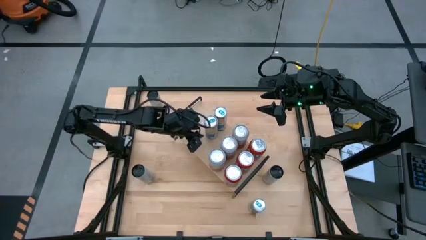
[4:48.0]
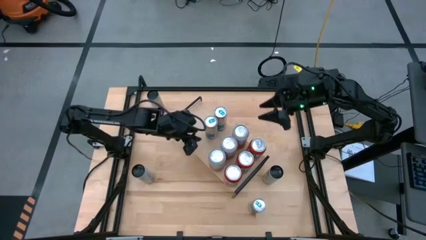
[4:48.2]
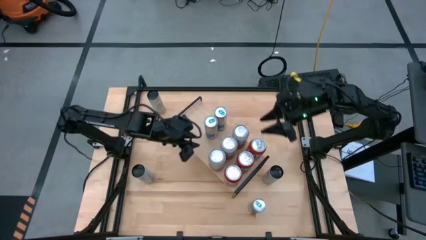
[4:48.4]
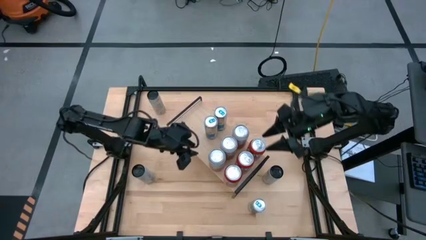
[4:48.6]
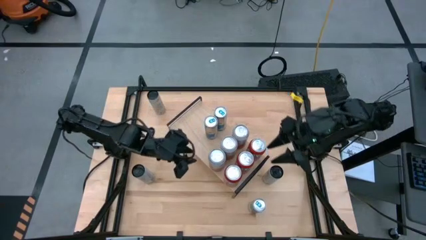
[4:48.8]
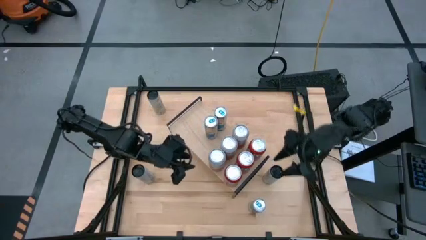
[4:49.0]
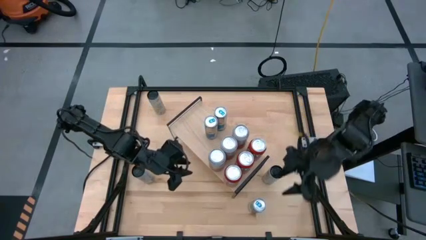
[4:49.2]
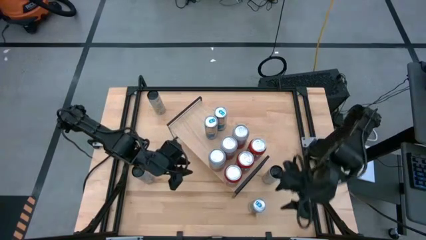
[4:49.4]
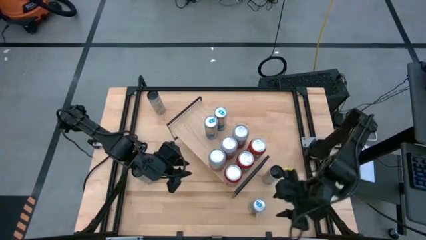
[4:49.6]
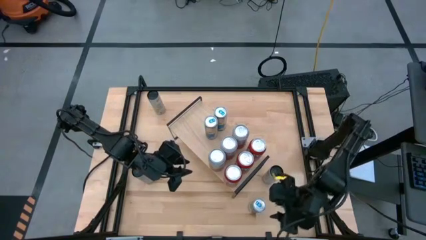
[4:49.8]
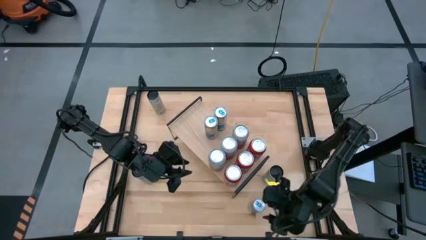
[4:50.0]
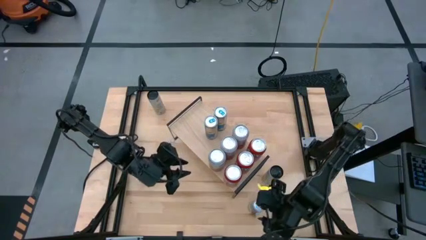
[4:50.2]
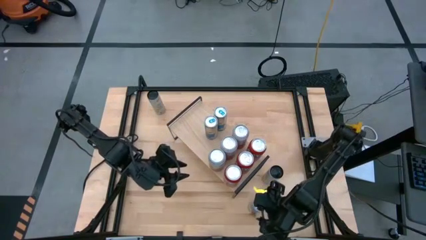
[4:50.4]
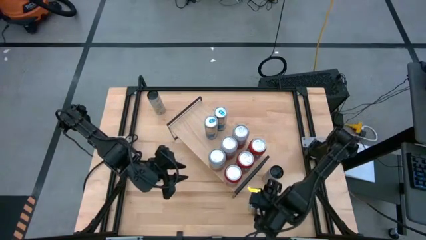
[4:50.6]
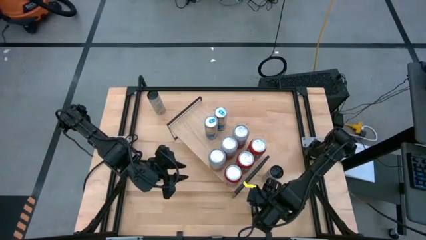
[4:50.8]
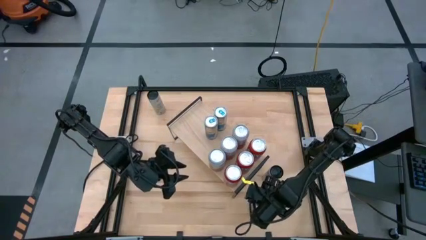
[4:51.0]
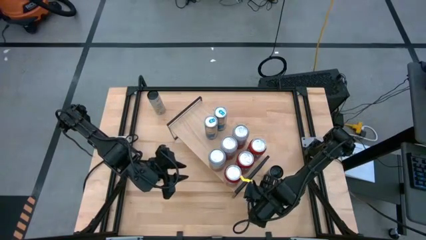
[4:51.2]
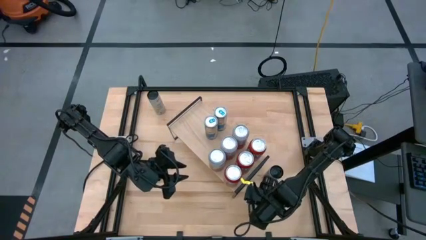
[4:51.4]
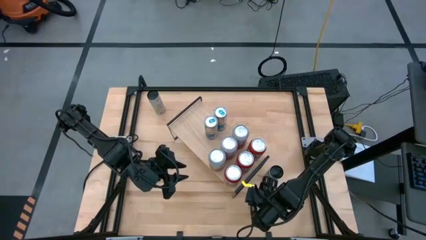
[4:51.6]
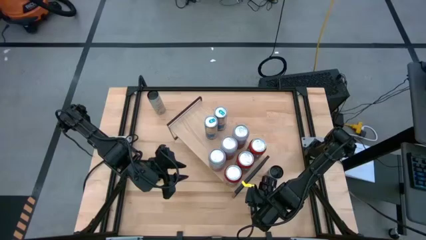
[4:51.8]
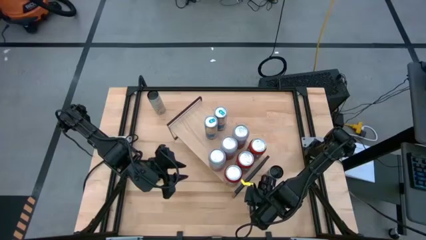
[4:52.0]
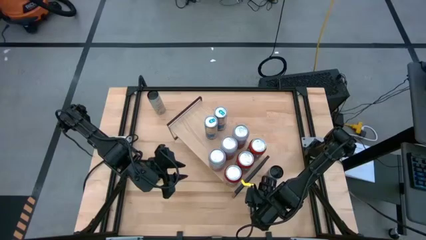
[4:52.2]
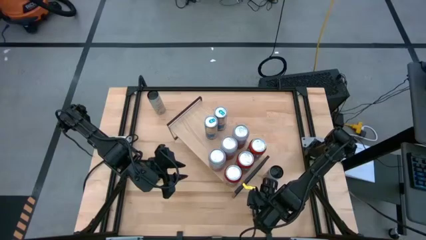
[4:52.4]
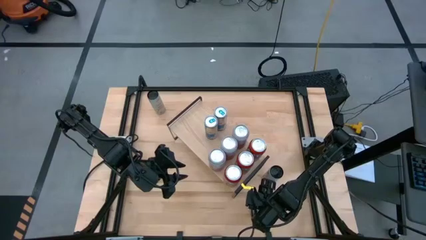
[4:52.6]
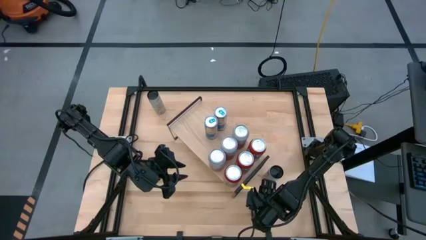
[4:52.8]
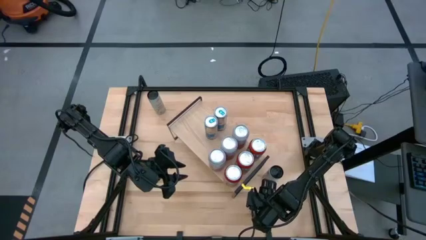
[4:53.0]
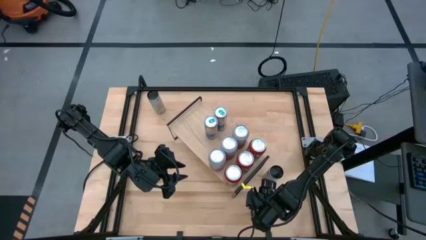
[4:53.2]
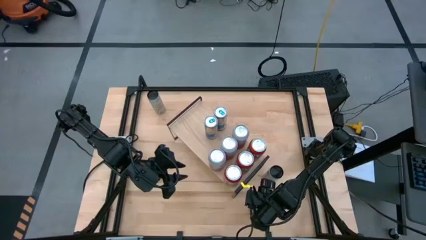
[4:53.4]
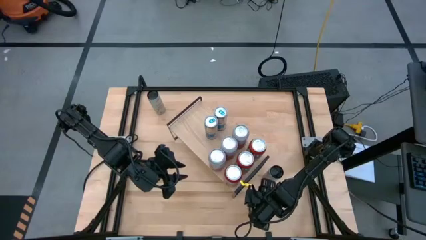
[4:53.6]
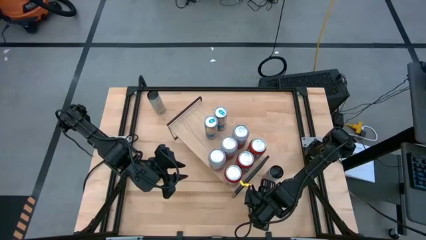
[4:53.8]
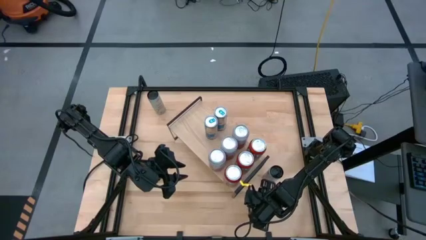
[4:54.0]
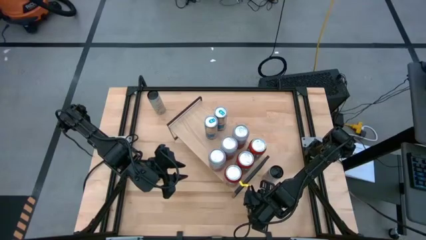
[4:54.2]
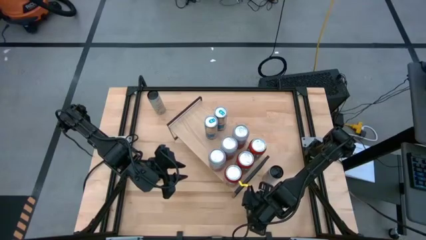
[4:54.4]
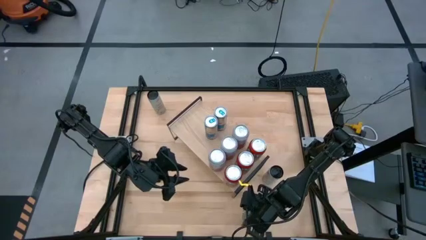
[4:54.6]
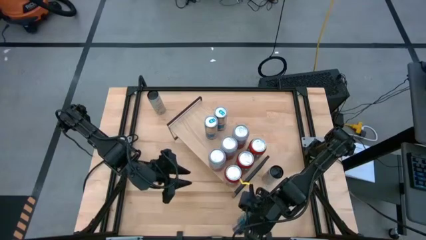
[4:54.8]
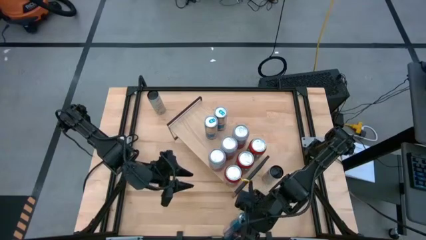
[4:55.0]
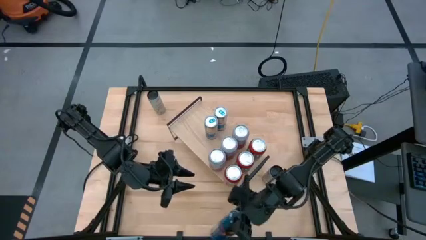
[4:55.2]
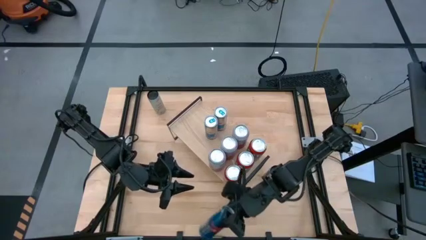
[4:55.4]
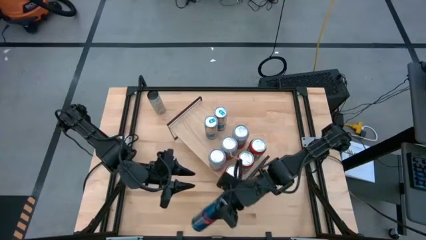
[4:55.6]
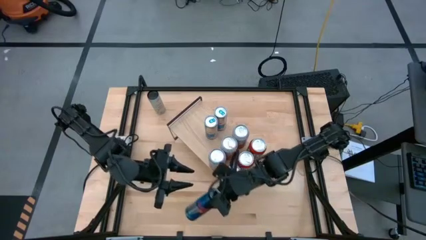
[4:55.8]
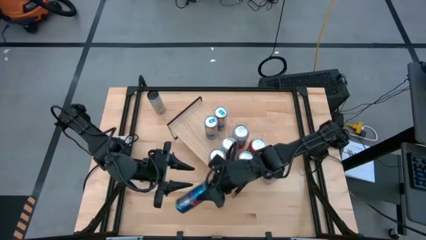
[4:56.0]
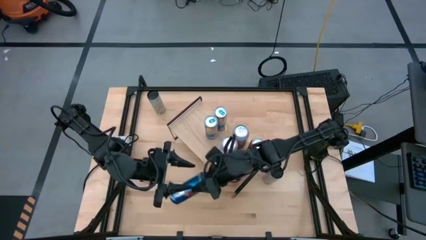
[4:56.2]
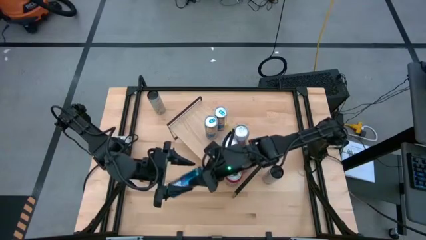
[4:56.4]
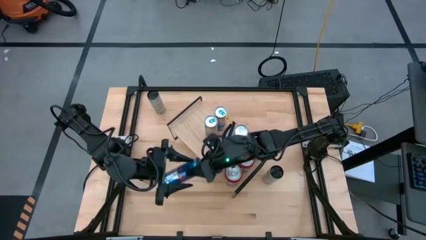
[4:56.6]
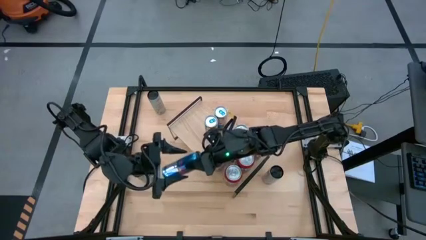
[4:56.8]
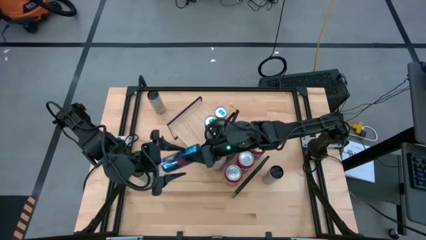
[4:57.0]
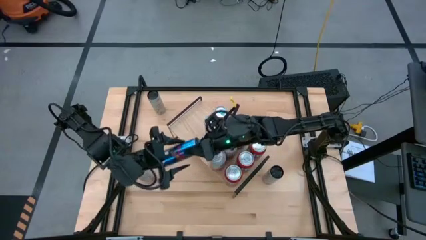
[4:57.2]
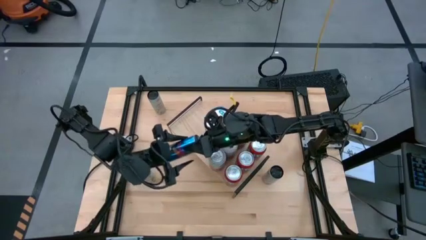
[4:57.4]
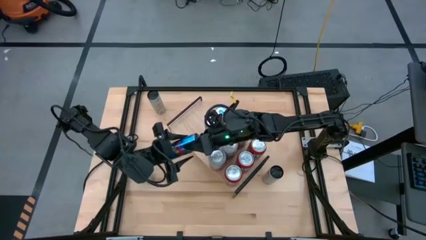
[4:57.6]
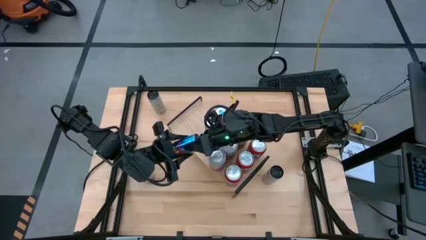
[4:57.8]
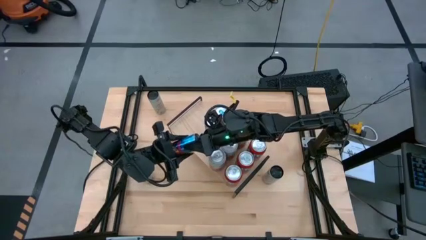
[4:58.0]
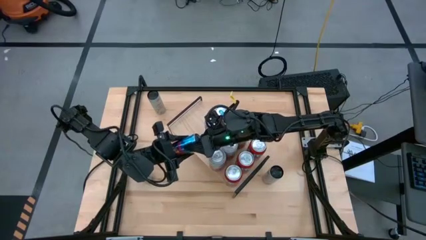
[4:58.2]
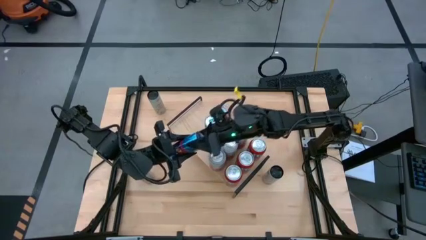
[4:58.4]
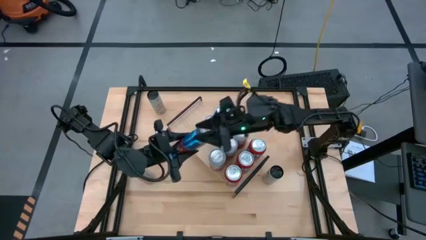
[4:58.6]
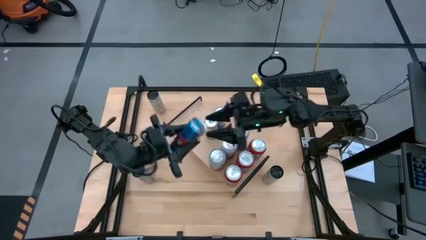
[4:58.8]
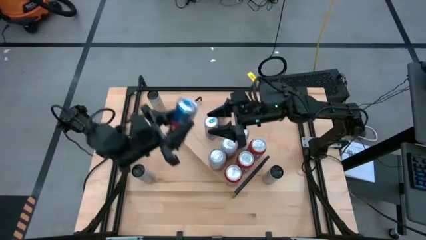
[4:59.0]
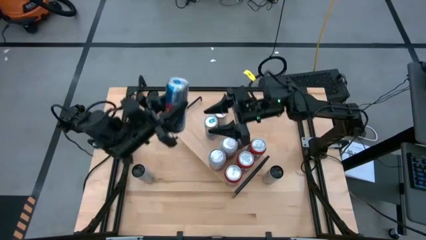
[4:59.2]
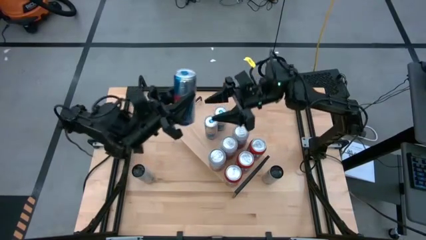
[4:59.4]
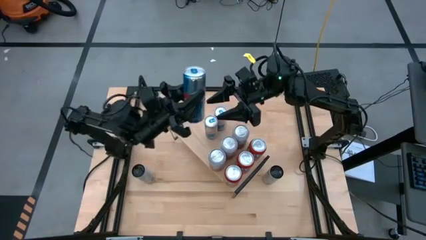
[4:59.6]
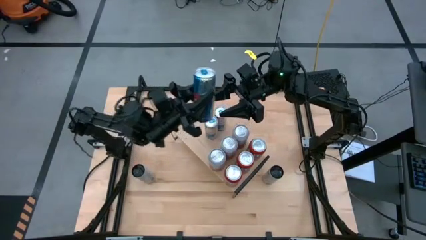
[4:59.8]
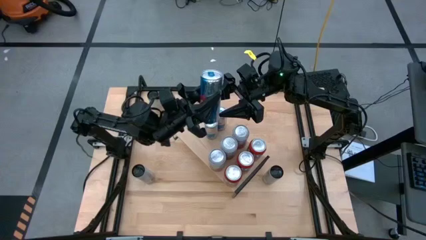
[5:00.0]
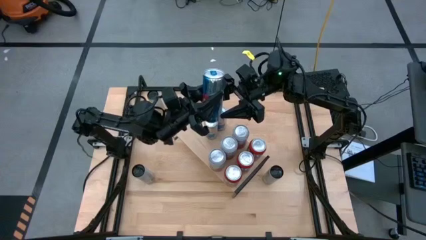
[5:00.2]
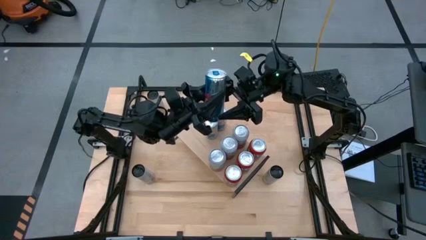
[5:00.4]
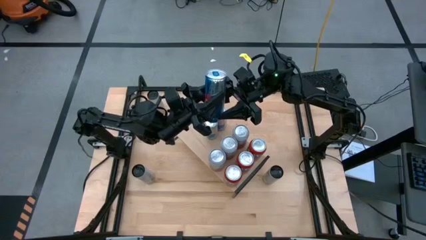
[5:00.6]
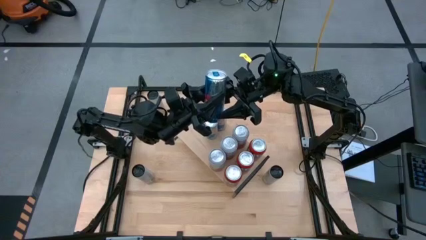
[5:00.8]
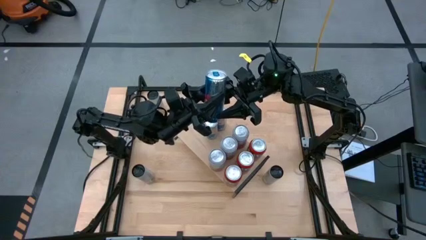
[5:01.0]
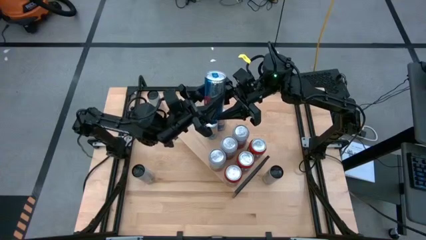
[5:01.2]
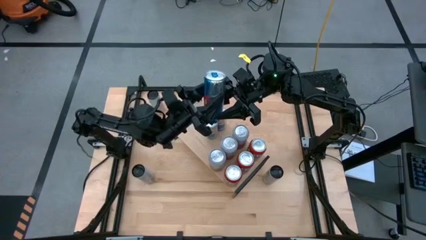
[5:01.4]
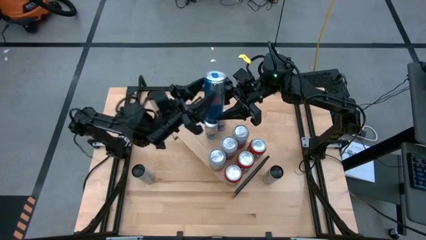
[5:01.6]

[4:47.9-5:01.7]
Task: Place canned beverage on shelf
Put the blue soda can on the shelf aligned with the other blue soda can

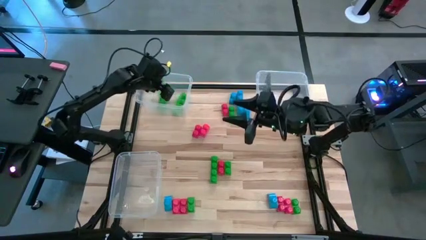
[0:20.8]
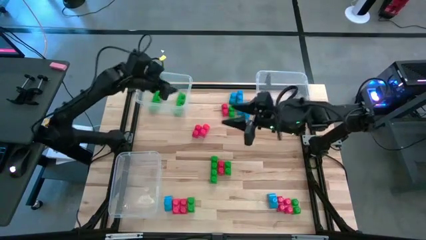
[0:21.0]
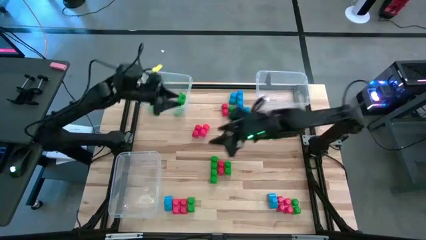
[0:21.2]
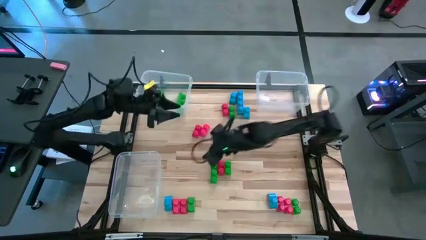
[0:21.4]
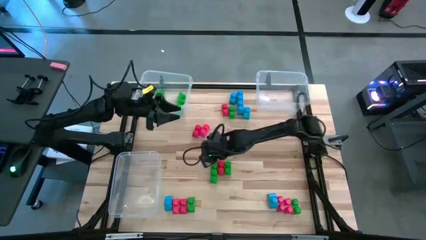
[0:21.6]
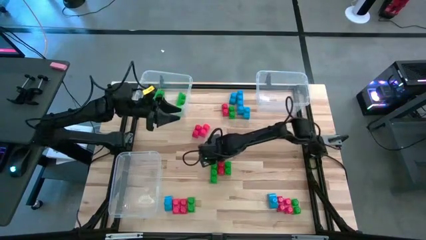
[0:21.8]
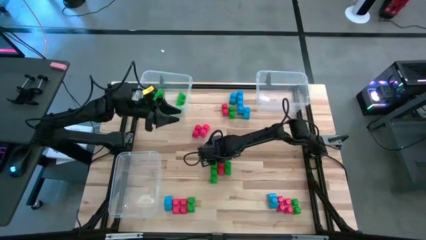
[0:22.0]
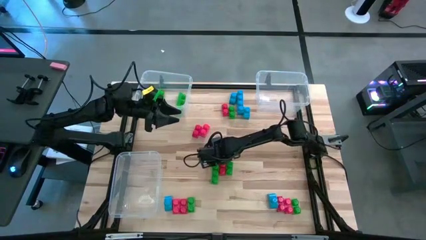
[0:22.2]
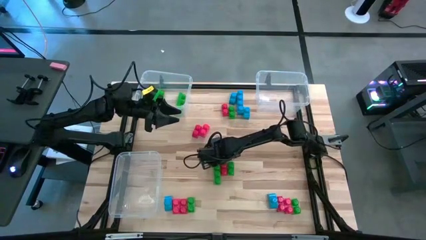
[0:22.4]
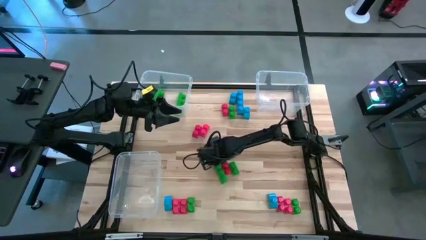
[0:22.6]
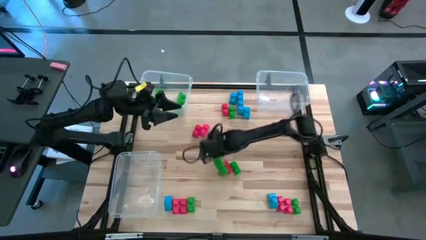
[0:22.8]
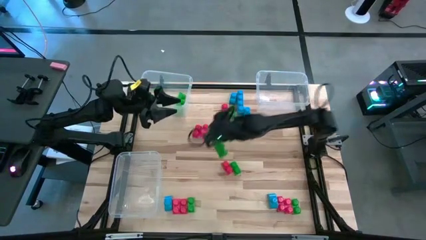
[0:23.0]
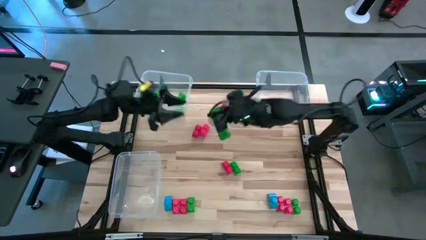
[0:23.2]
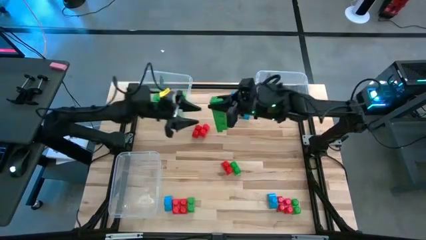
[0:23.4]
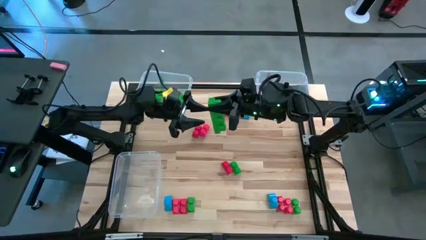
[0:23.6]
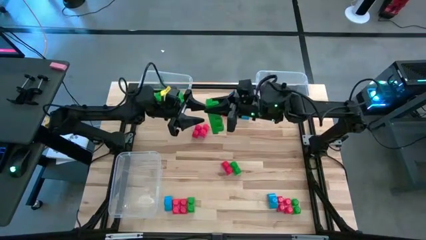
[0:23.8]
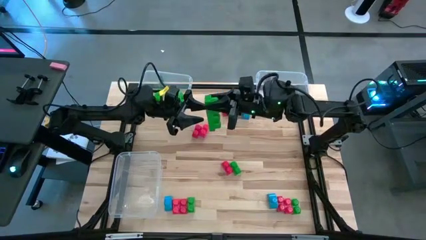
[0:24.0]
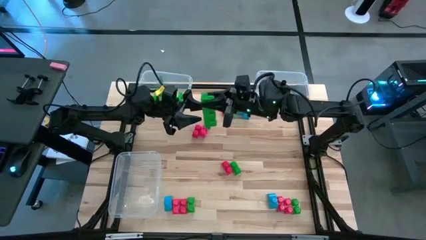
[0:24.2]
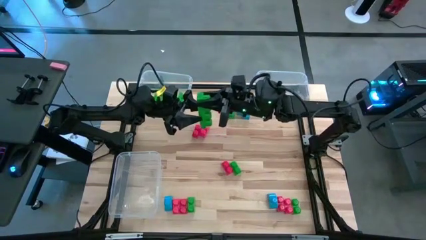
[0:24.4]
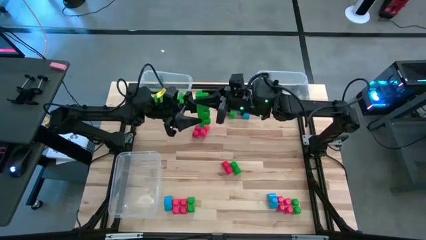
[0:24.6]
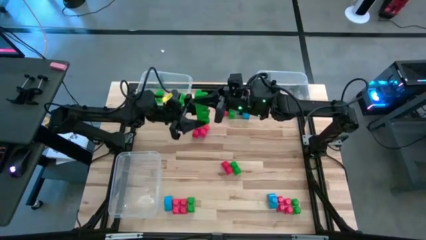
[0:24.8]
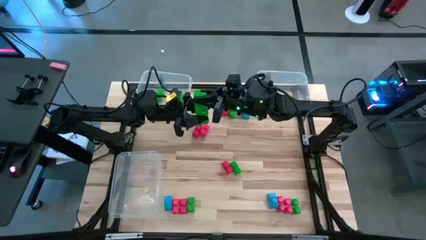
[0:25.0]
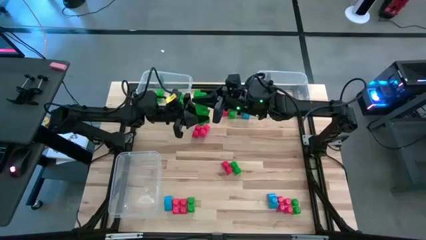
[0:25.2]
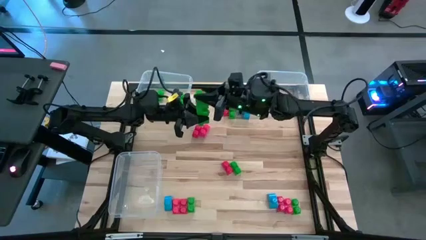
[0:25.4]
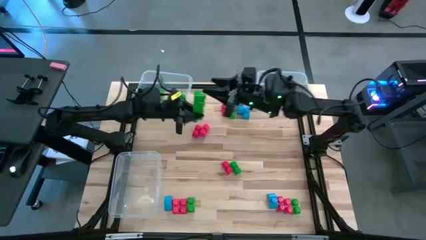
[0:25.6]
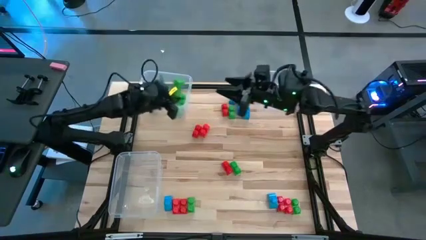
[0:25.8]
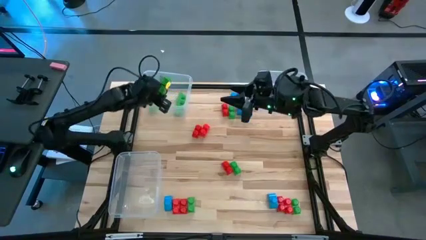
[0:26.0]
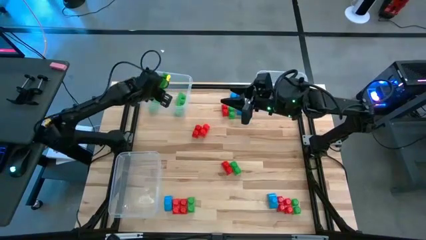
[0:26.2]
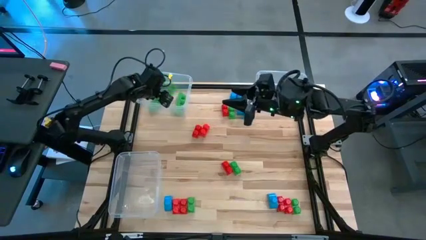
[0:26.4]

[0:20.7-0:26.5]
Task: Sort blocks
Put the green game piece into the top left transparent bin
